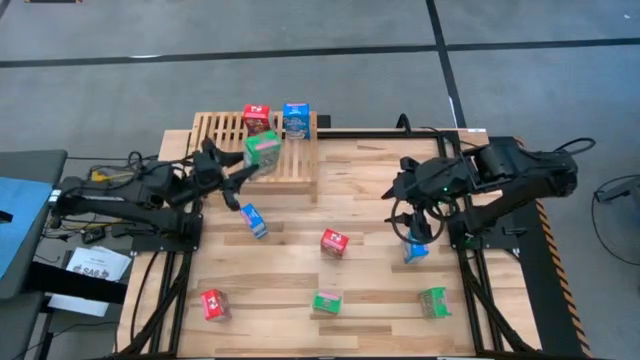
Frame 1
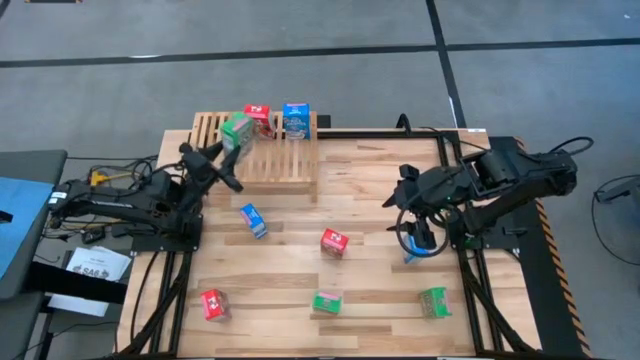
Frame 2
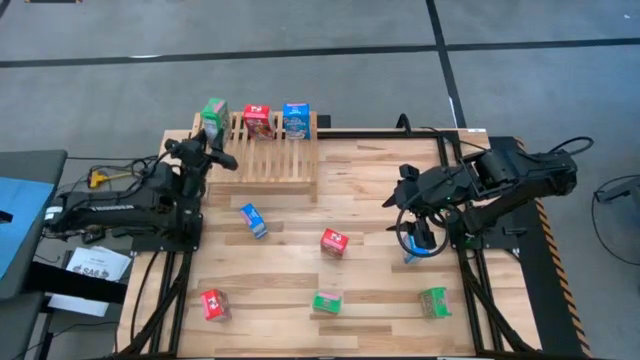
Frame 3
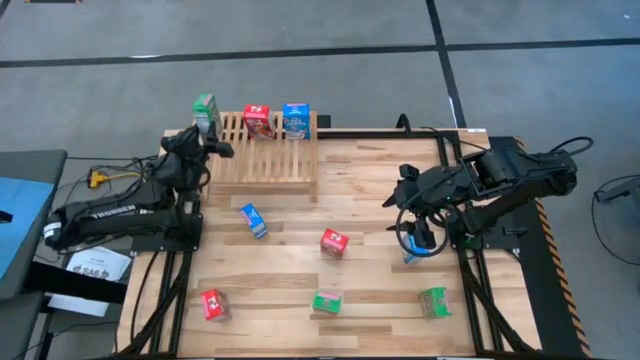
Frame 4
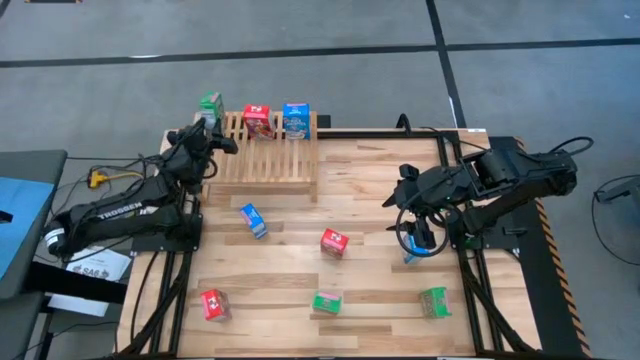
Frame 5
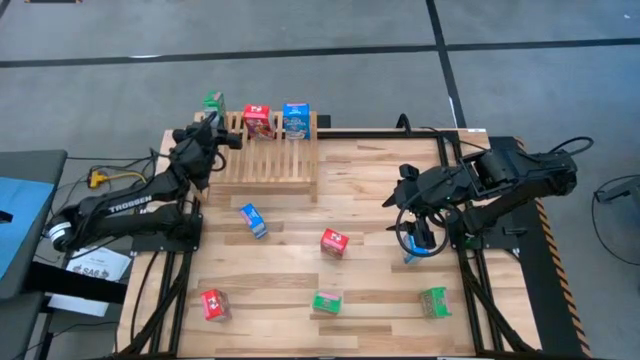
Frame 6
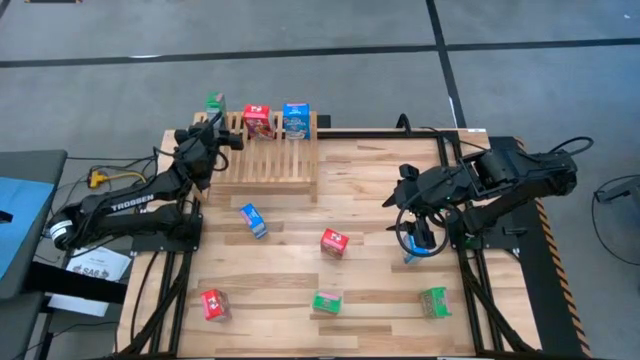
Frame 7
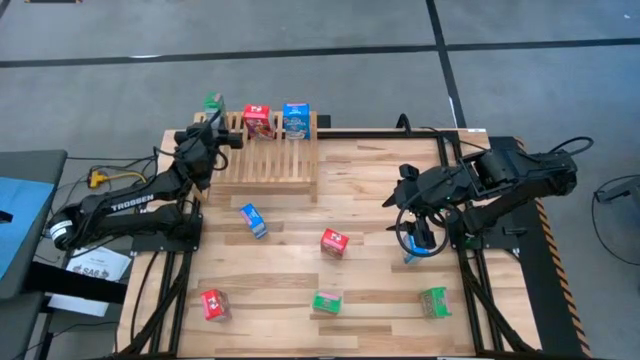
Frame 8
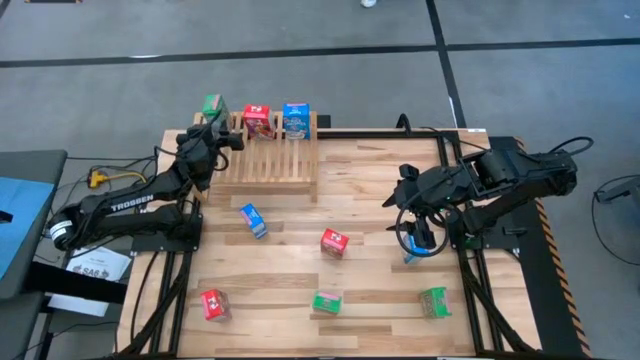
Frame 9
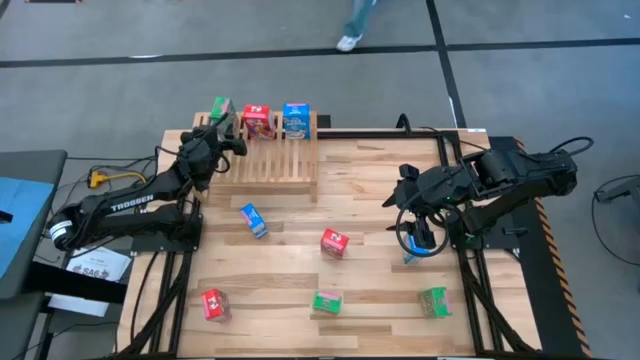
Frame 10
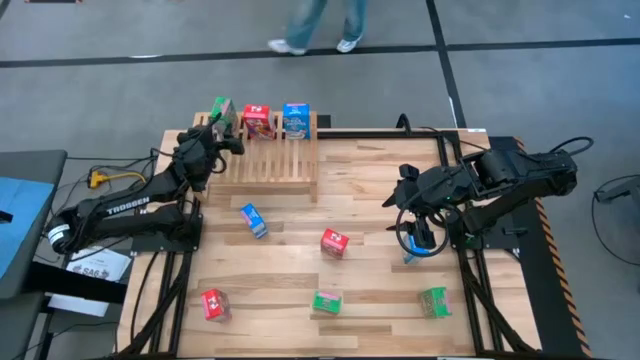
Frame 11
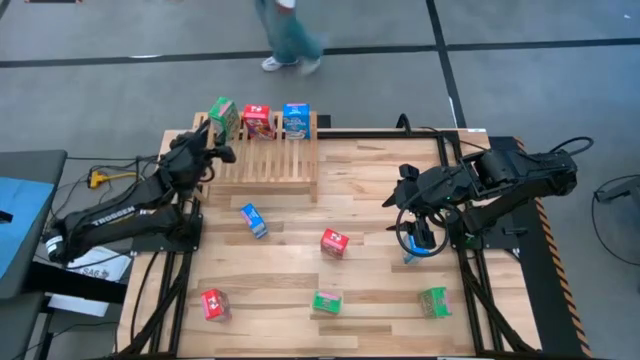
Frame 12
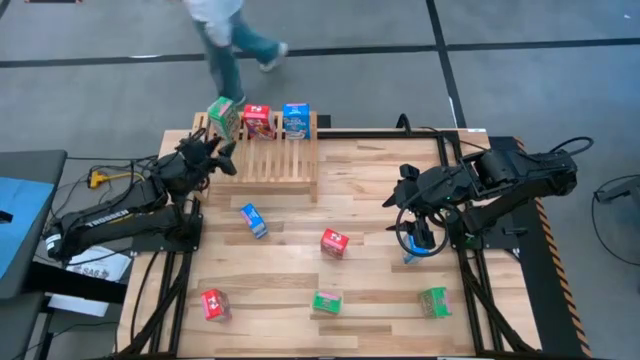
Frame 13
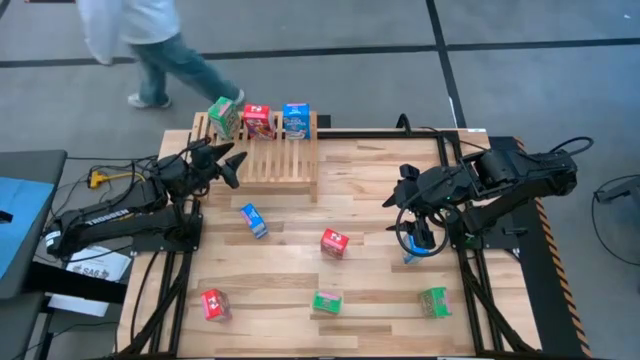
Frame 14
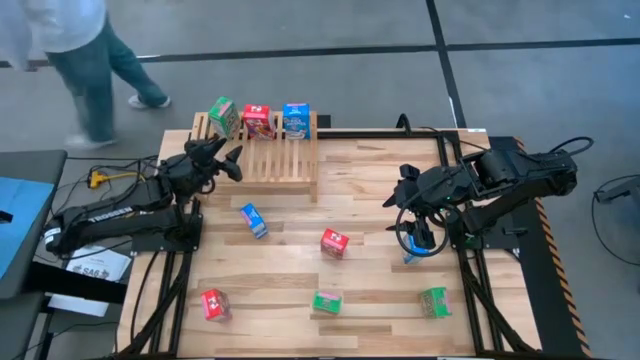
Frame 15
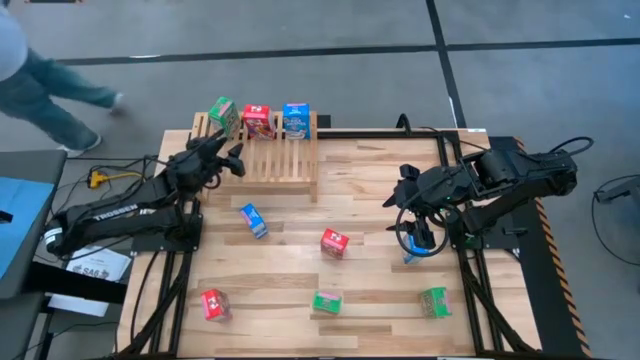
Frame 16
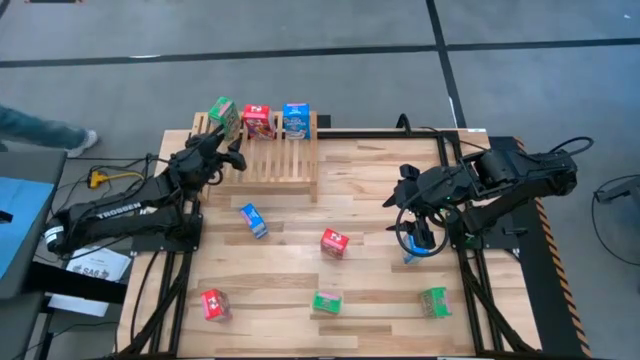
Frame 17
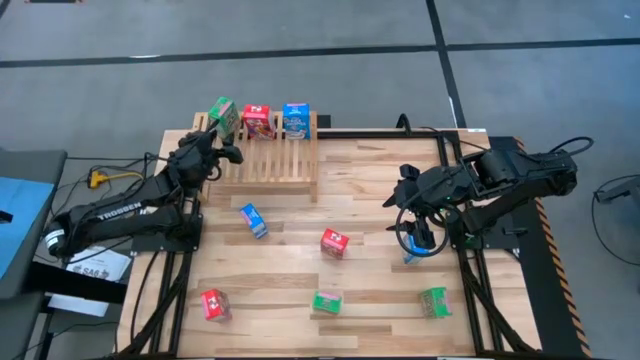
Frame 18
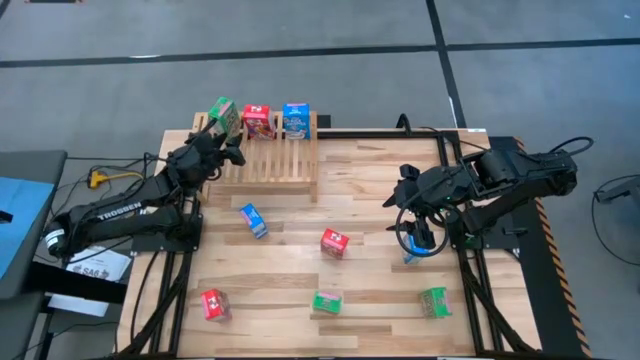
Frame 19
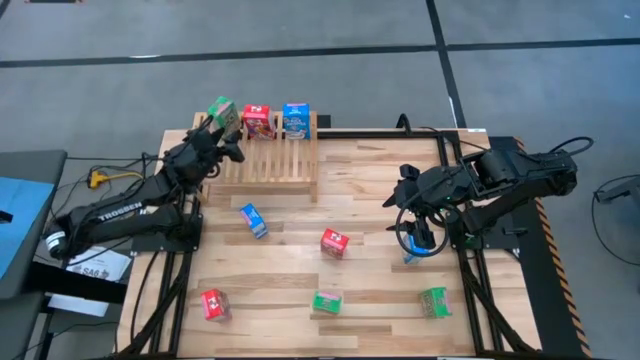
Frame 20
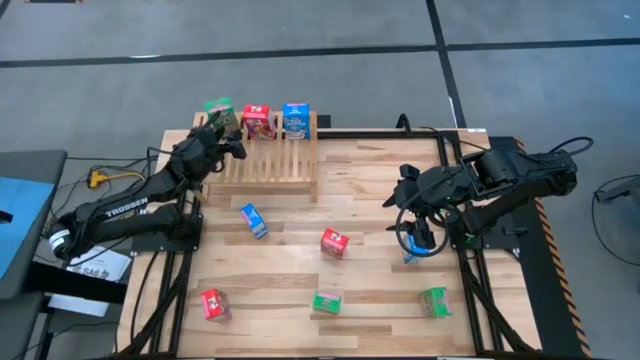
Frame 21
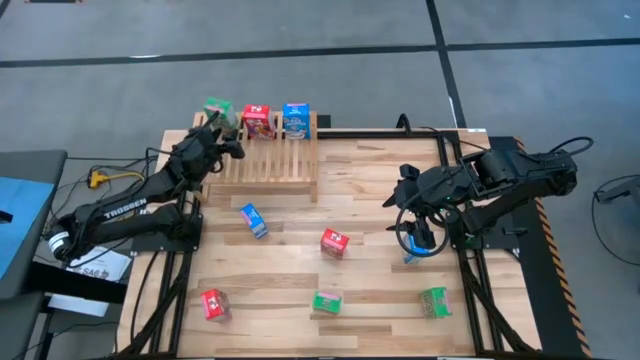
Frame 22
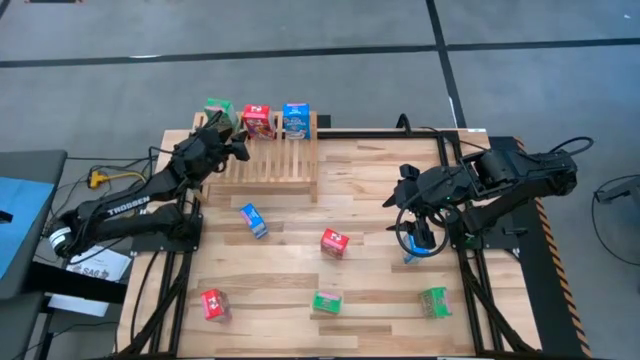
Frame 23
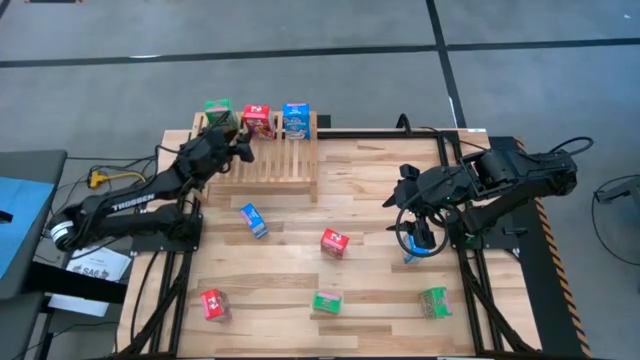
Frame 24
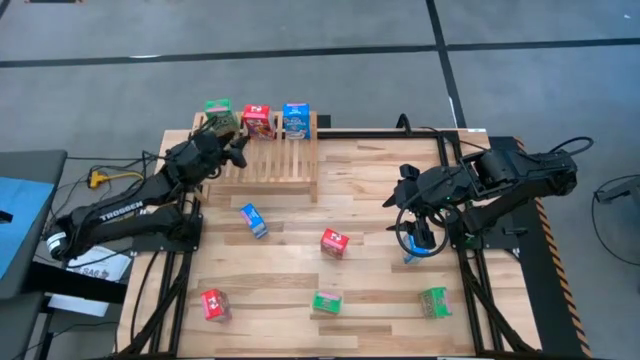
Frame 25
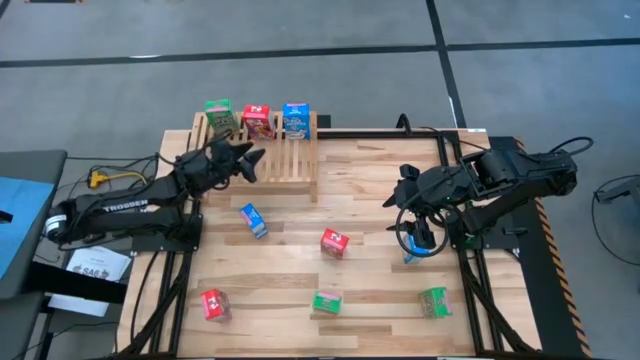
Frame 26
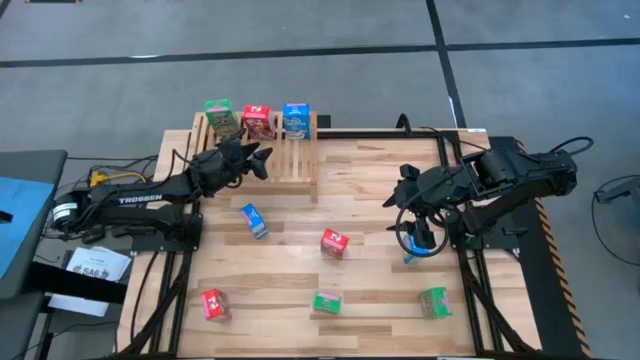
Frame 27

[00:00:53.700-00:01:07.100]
Task: Stack cereal on shelf
Put the top right green cereal box on the shelf

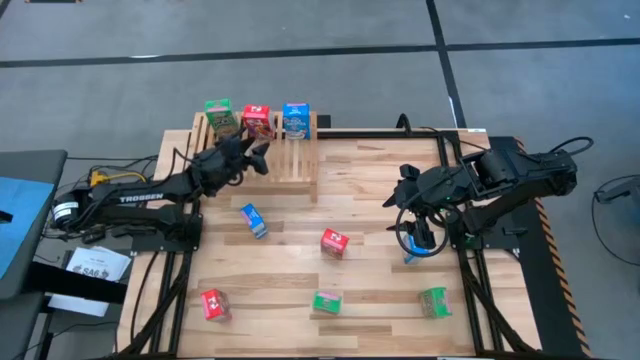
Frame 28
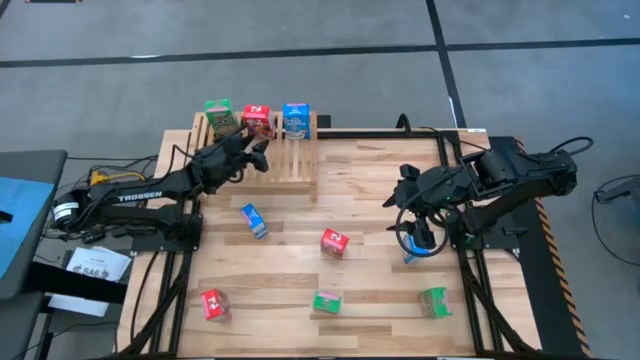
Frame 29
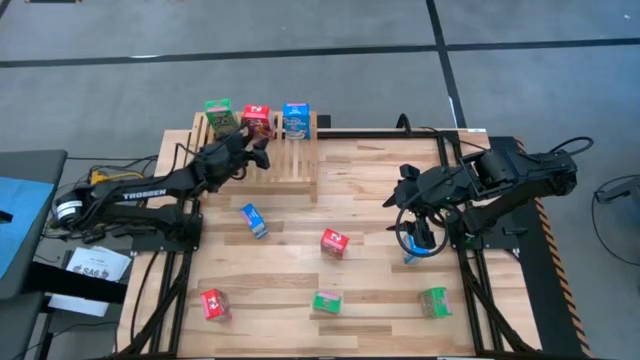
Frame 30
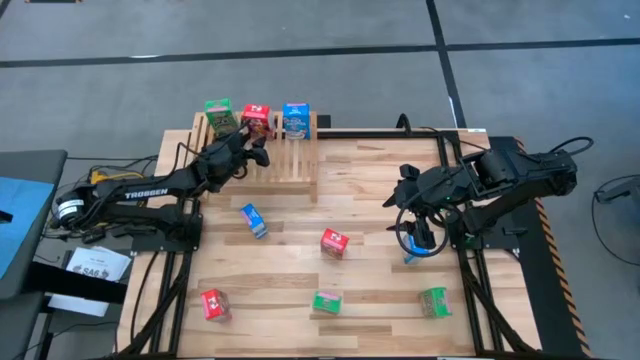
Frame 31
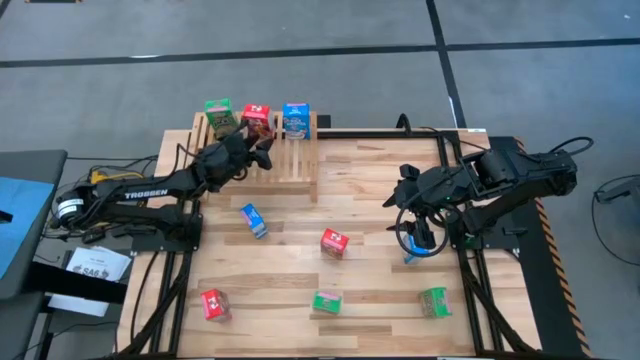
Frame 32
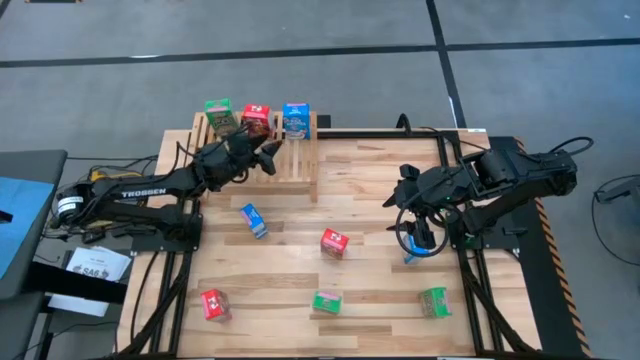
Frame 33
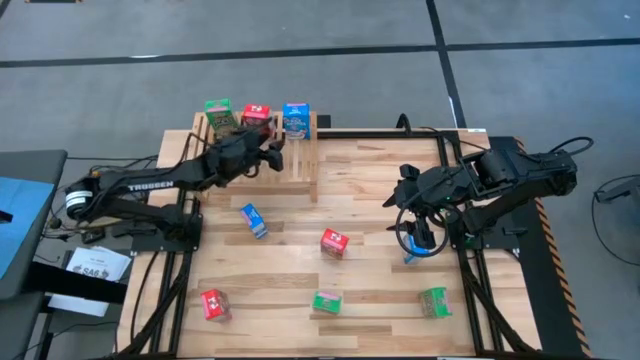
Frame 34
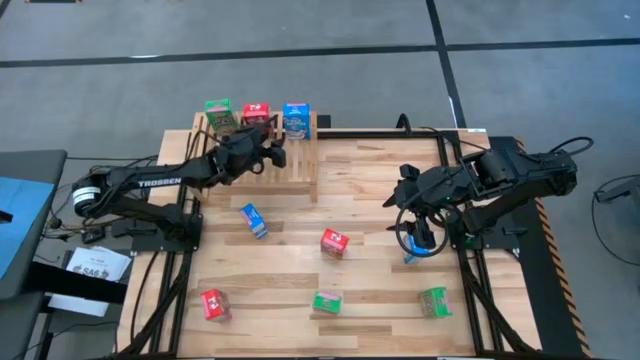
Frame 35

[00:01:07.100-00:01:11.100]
Adjust the red cereal box on the shelf

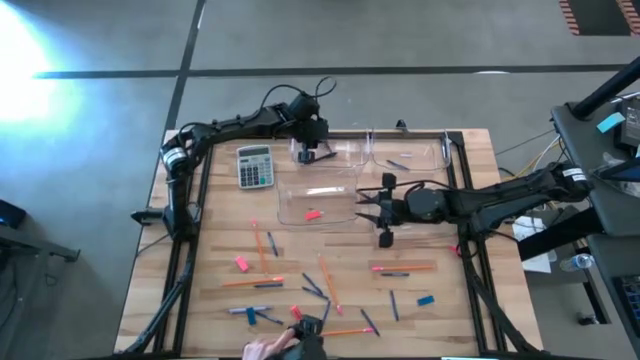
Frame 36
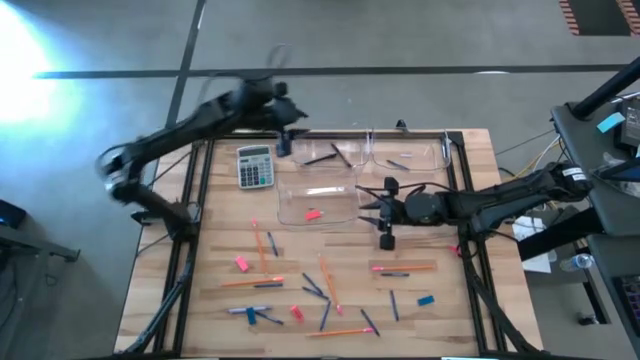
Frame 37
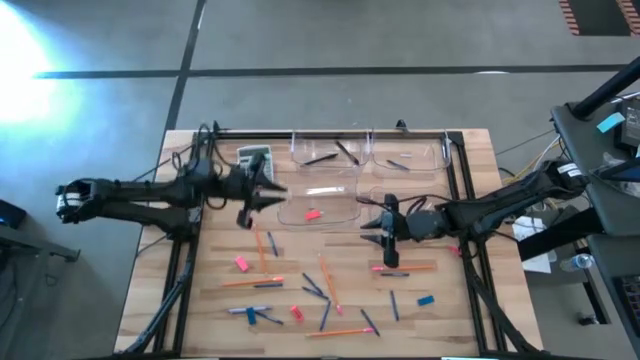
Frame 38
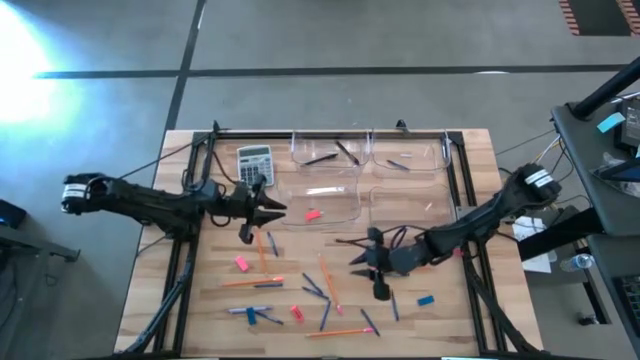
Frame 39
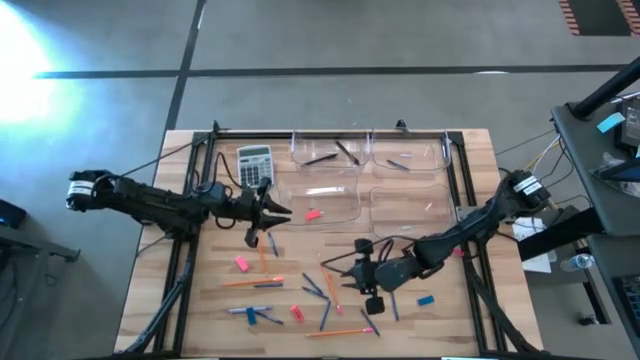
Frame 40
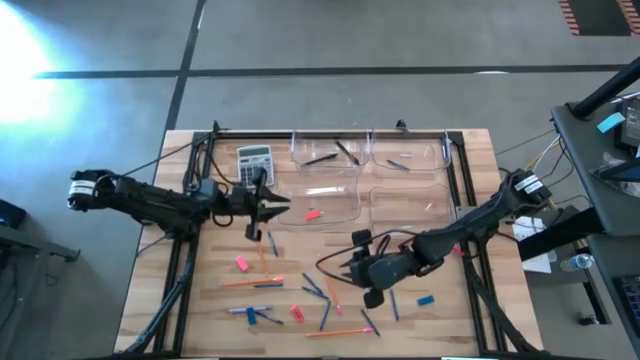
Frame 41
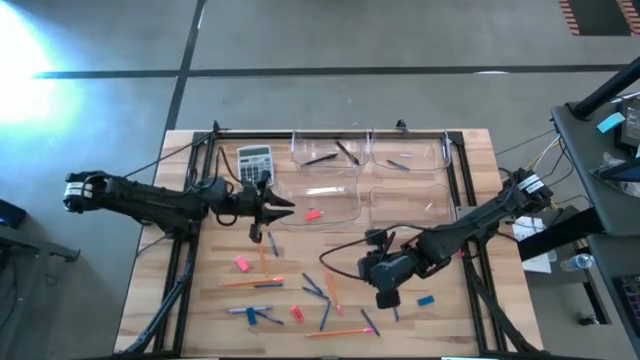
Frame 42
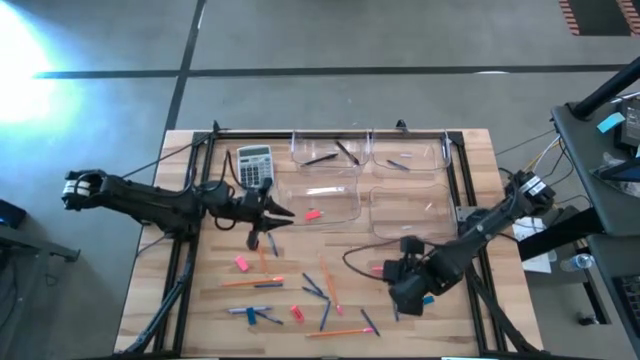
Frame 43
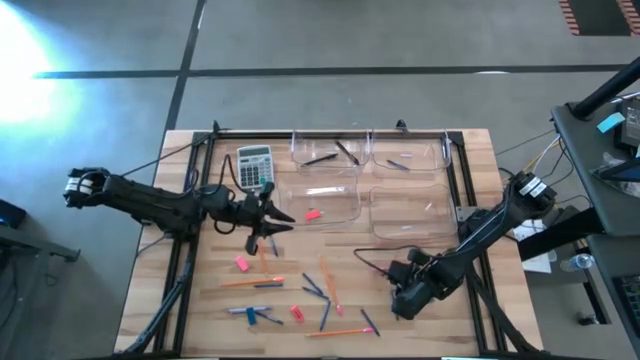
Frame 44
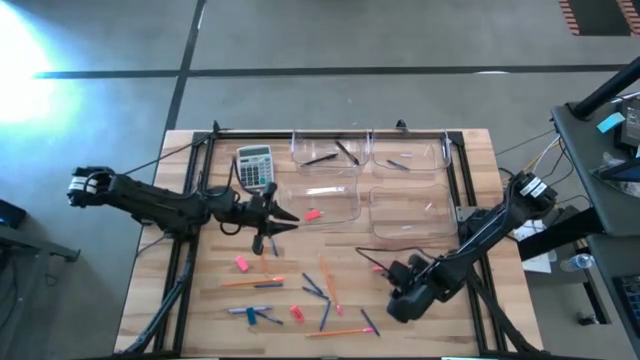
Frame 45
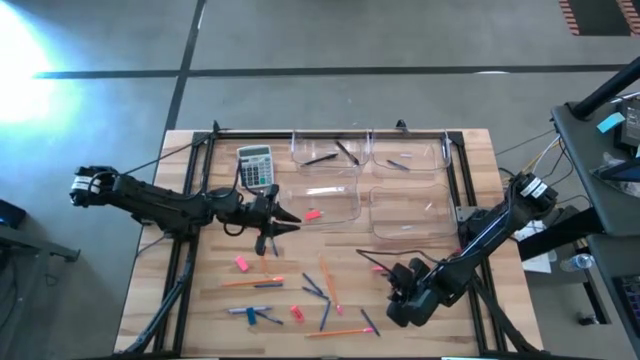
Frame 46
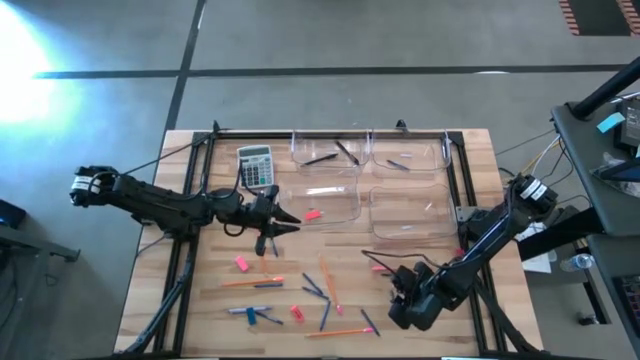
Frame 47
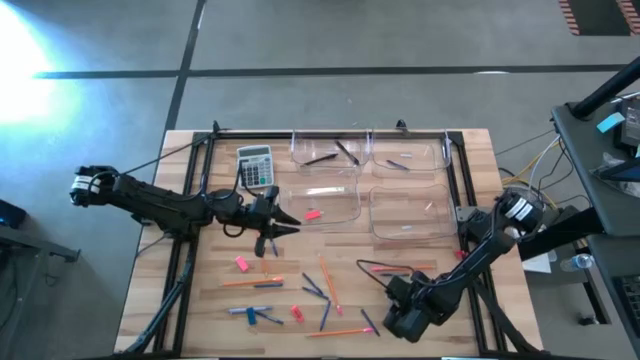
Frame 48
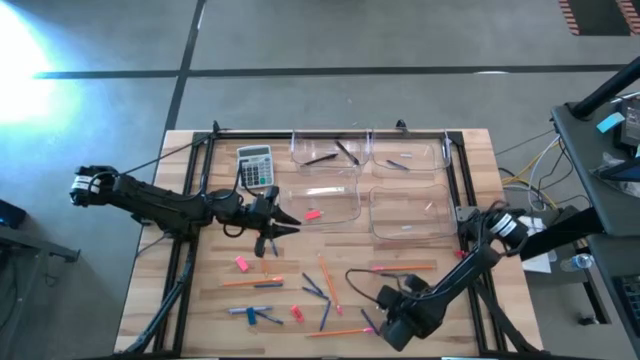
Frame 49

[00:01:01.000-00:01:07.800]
Task: Sort crayons/erasers/pens/pencils in bins
Put the blue crayon into the top right transparent bin
